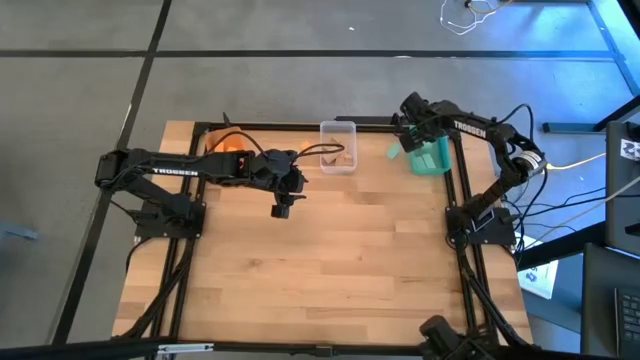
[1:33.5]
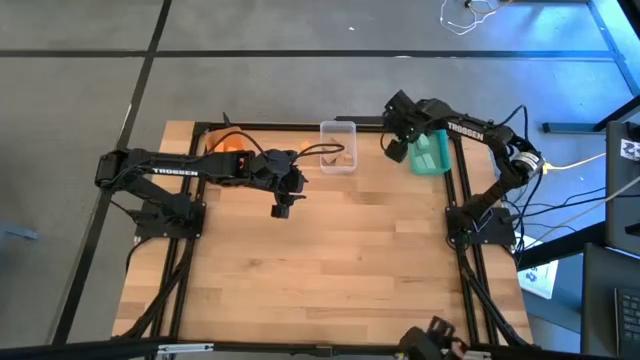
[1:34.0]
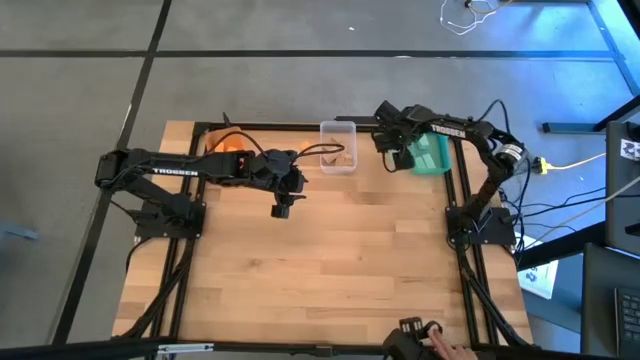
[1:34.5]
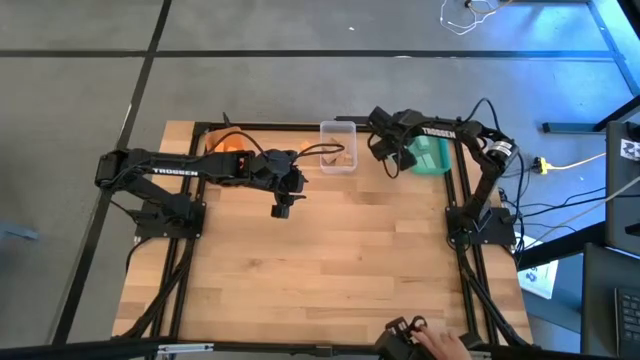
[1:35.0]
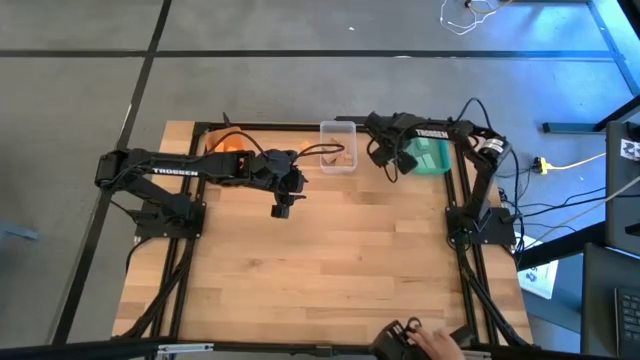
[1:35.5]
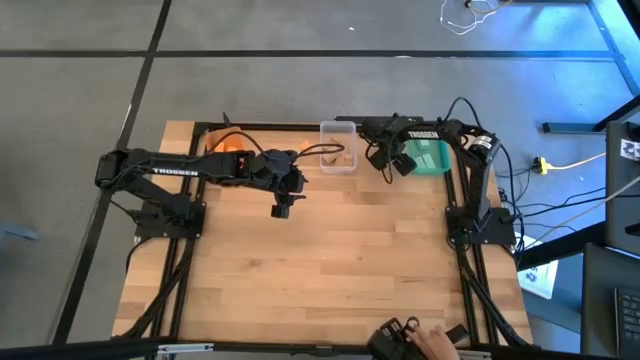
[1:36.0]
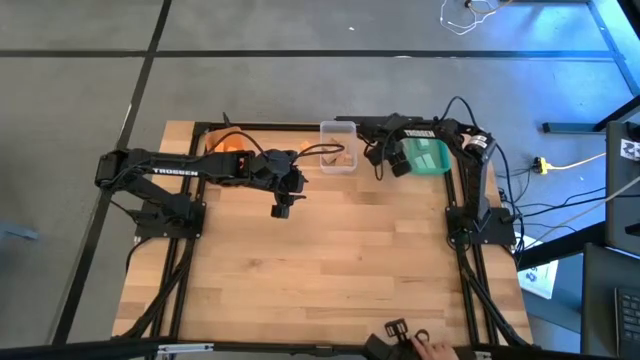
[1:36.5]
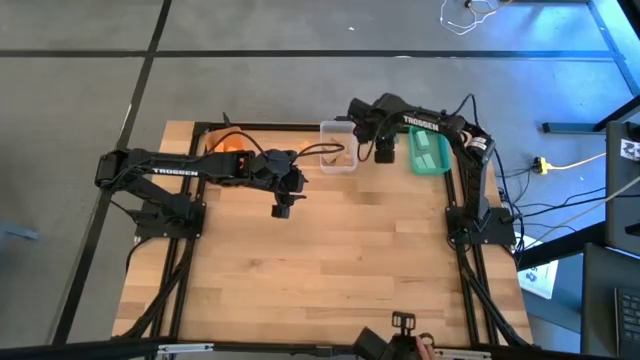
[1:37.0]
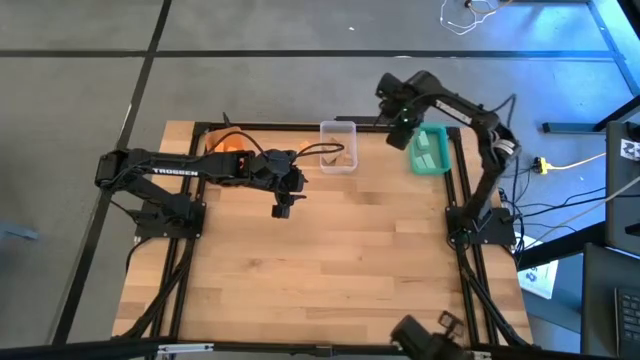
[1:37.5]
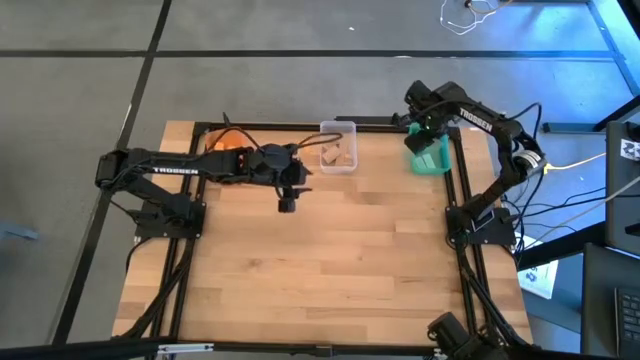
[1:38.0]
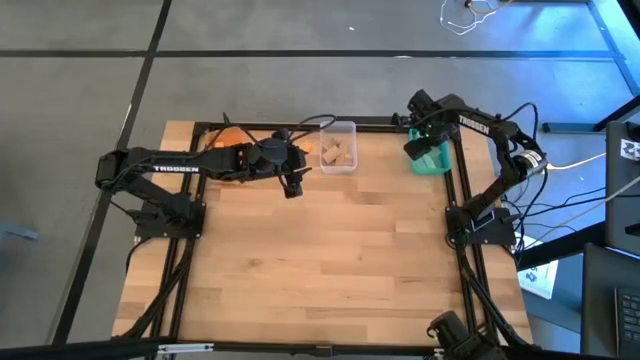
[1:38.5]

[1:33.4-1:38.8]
Task: Sort & place blocks by color
Put the green block into the green bin

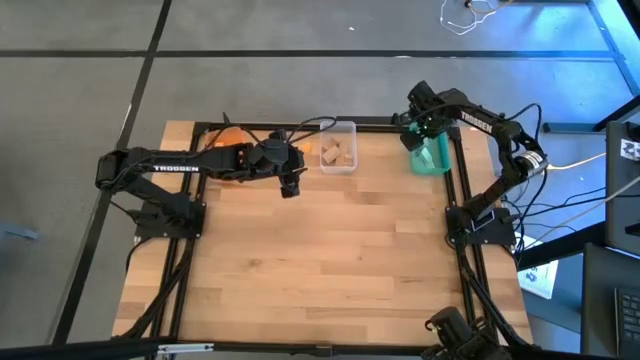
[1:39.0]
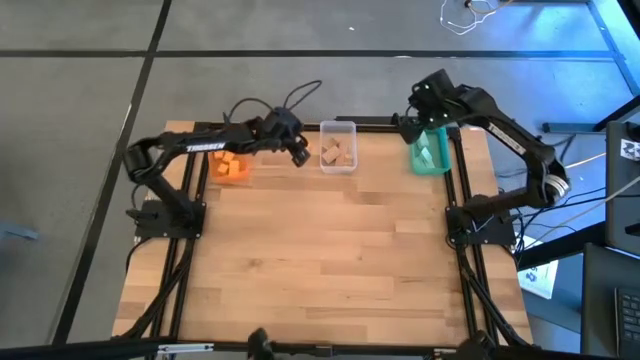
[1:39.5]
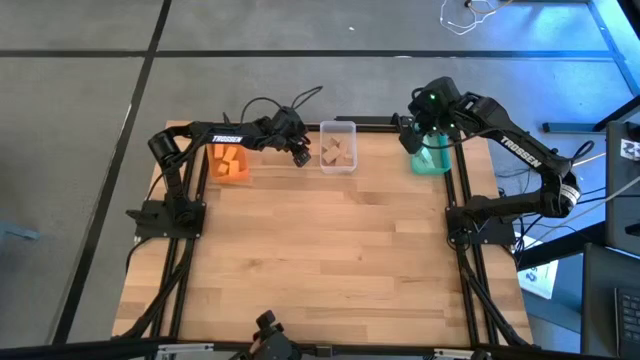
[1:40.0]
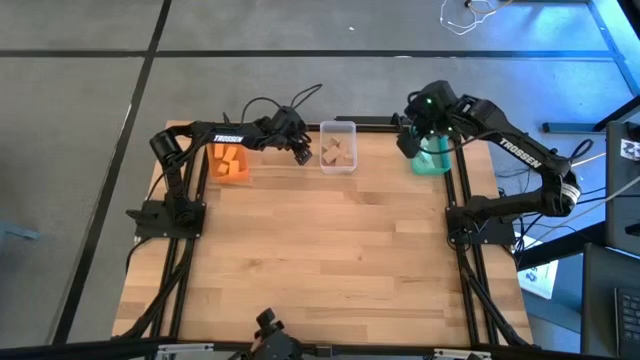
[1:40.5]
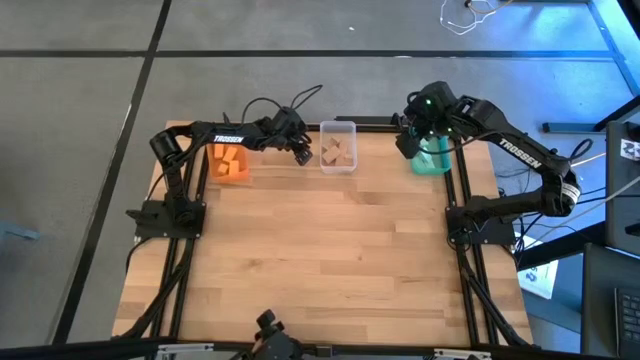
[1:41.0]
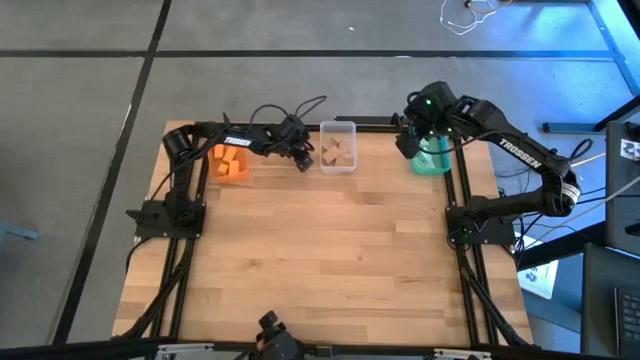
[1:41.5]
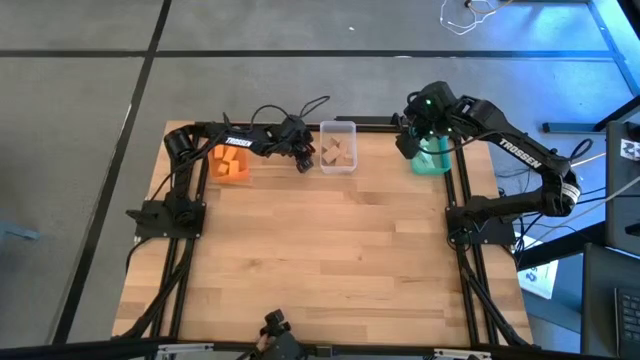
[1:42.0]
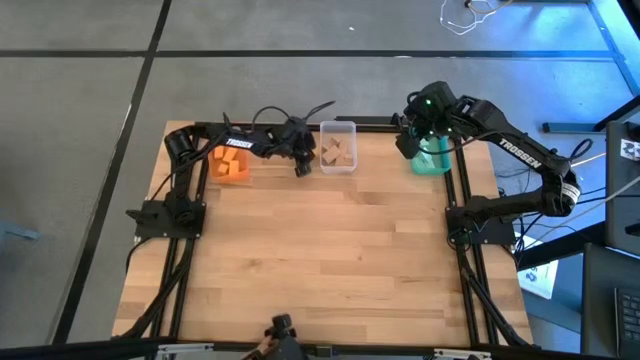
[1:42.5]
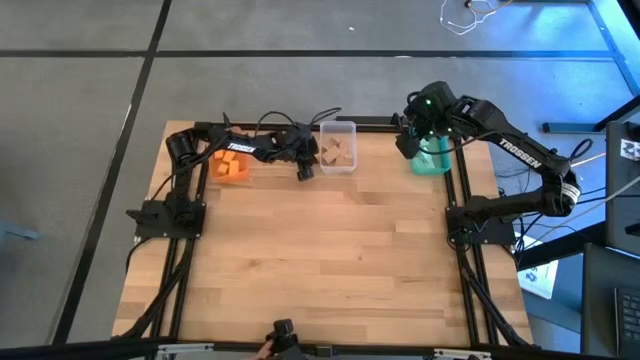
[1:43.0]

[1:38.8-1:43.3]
Put the orange block into the orange bin

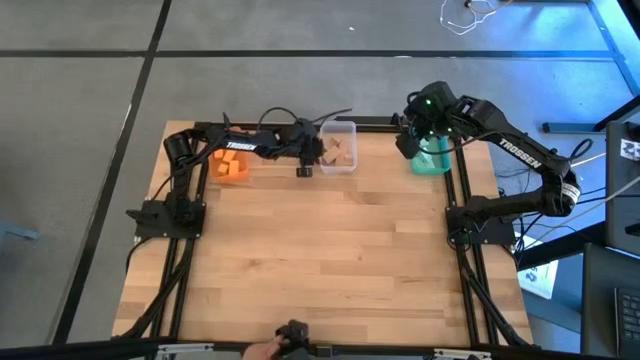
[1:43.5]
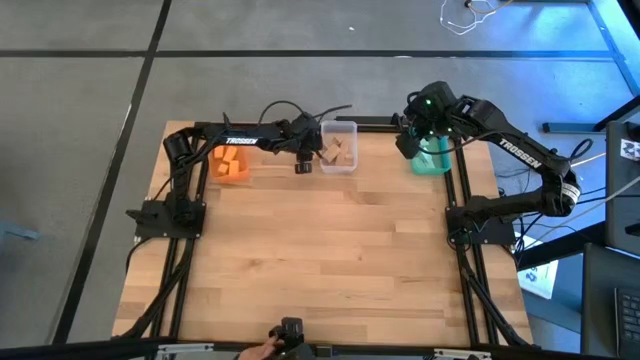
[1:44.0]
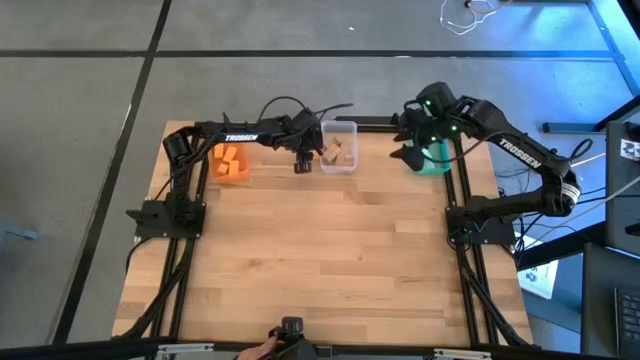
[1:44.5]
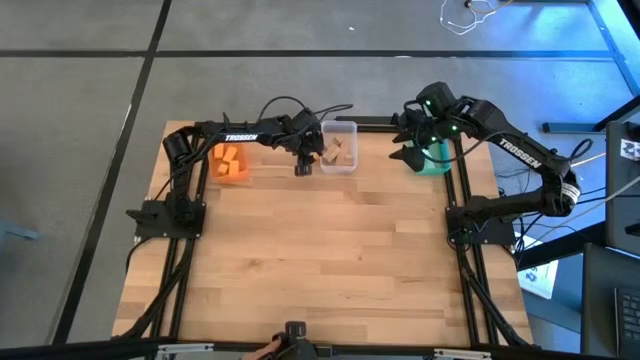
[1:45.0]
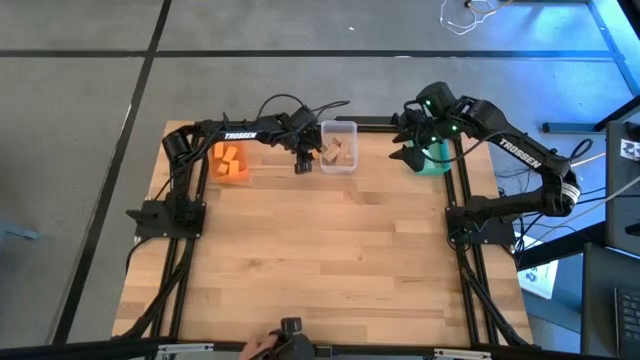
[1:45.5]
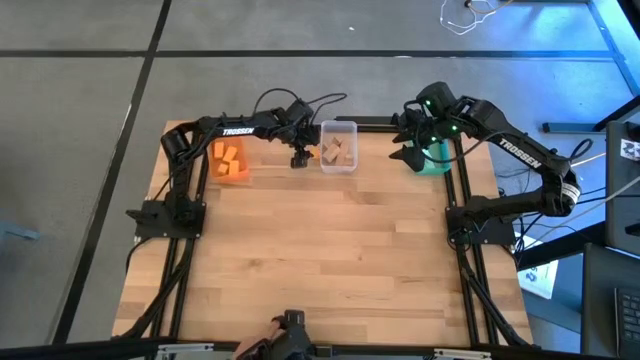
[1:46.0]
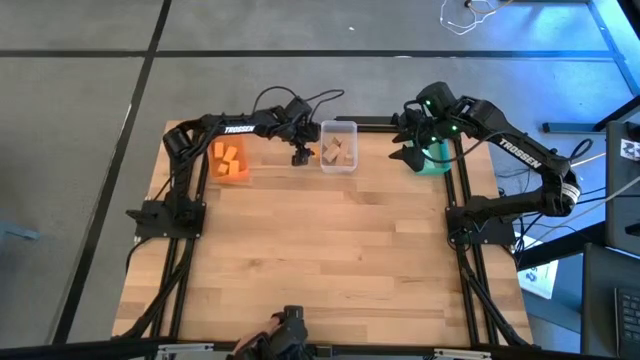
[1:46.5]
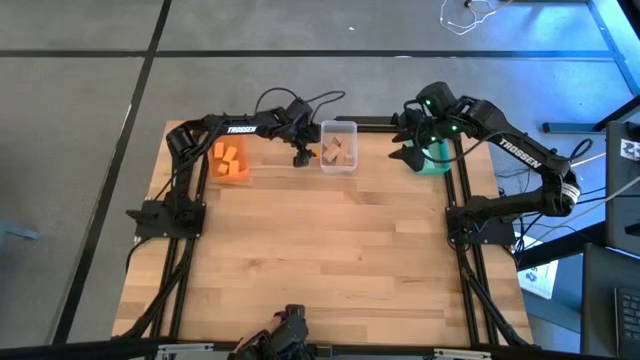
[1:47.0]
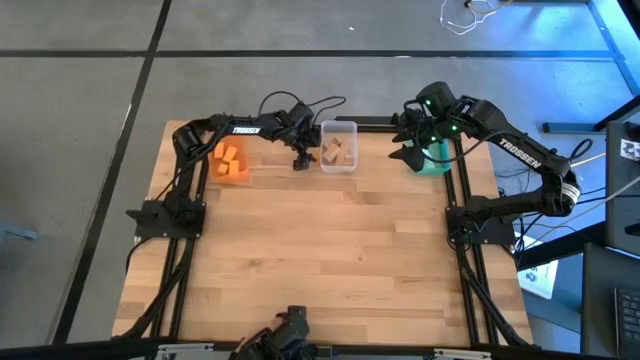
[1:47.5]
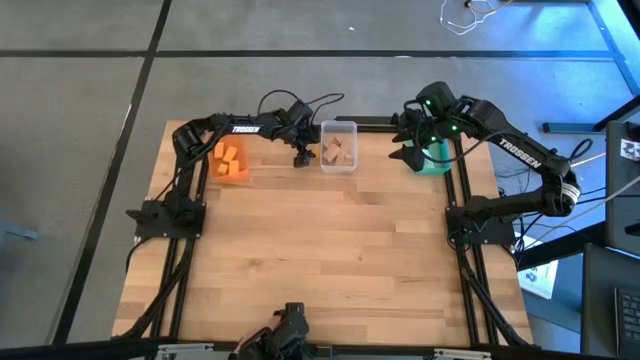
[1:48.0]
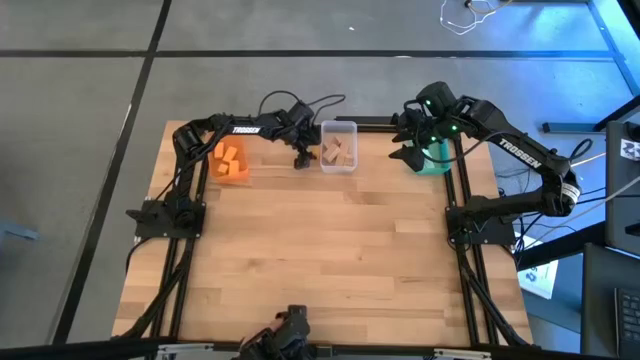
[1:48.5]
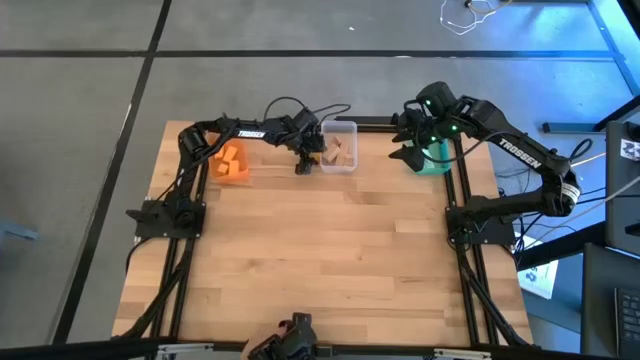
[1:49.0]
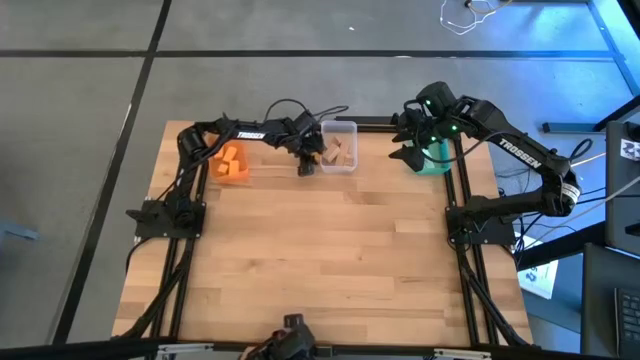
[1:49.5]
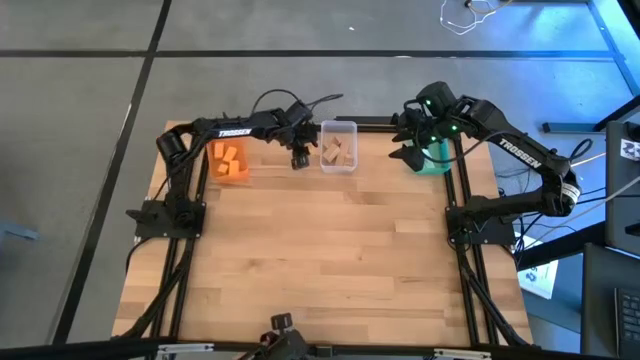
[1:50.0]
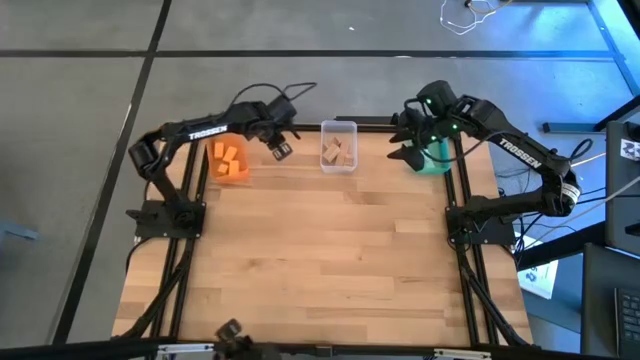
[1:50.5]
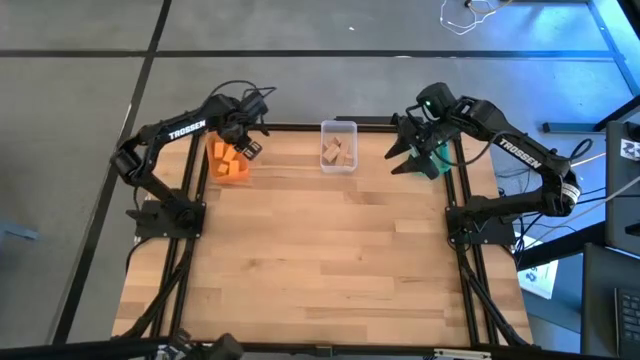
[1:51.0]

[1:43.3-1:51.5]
Put the orange block into the orange bin

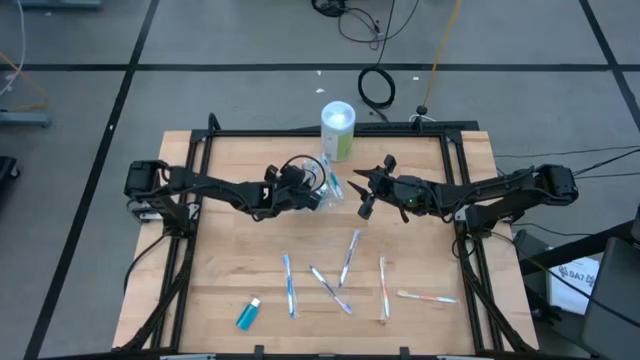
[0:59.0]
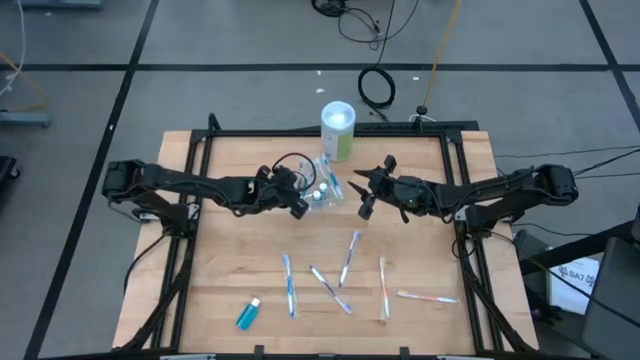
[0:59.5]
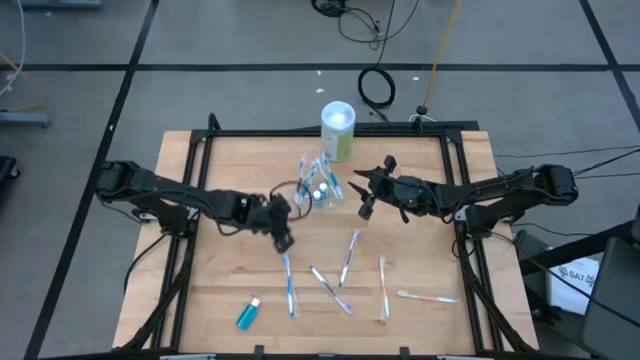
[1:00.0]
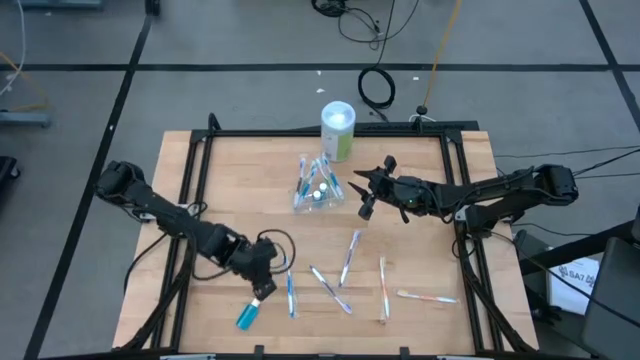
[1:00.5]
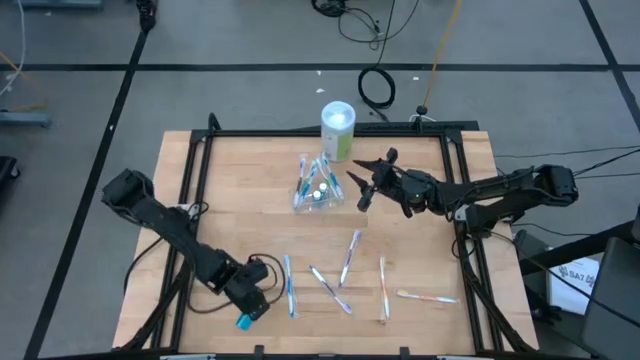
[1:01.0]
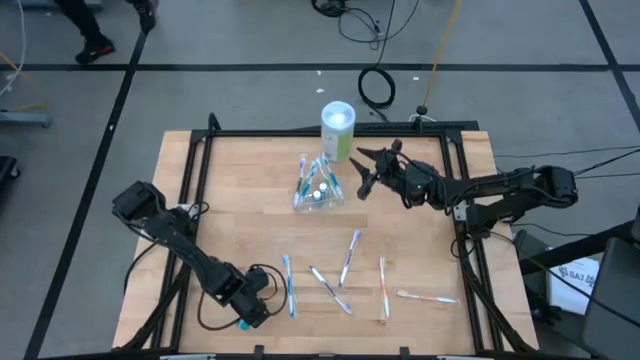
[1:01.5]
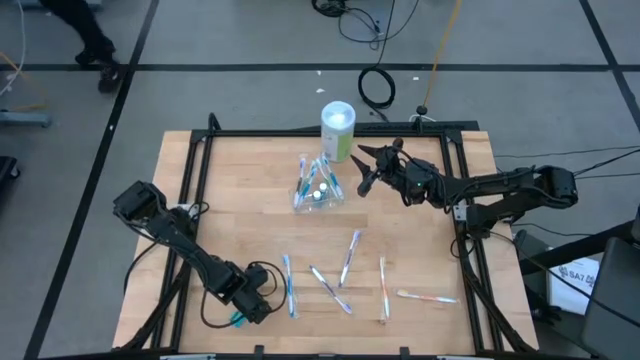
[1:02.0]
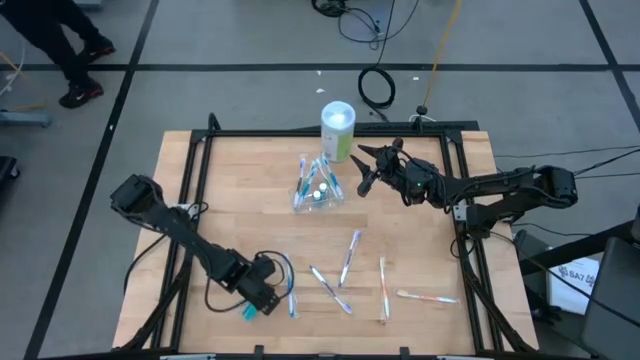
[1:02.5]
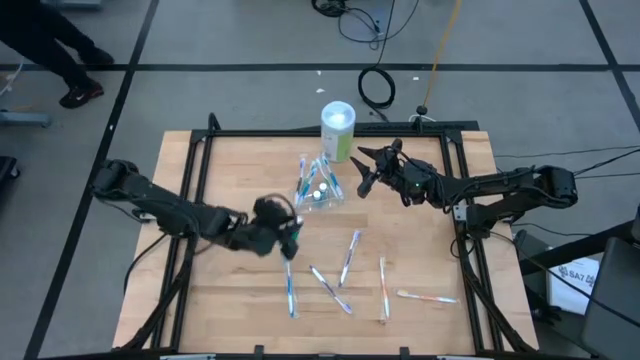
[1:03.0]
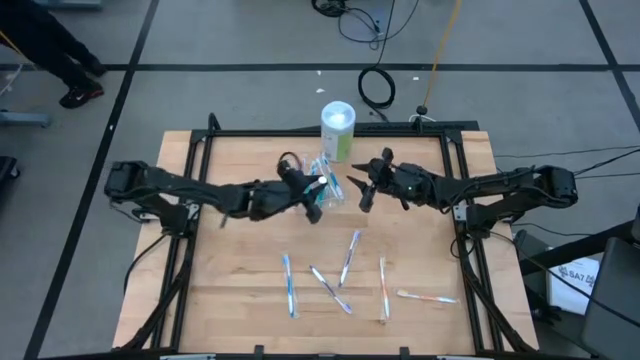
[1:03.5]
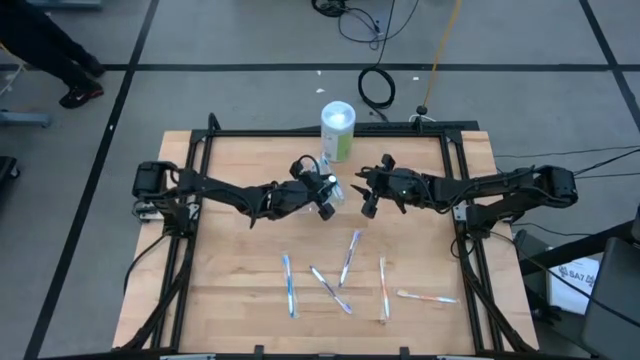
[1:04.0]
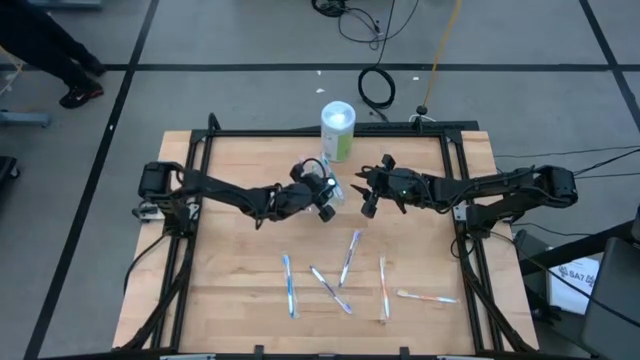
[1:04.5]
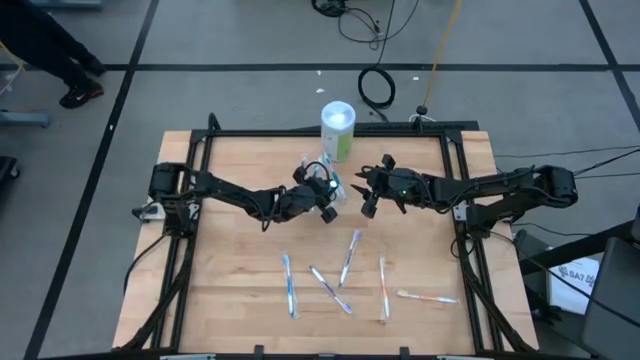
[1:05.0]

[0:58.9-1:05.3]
Task: Pick & Place toothbrushing station
Put the blue mouthwash into the transparent organizer
